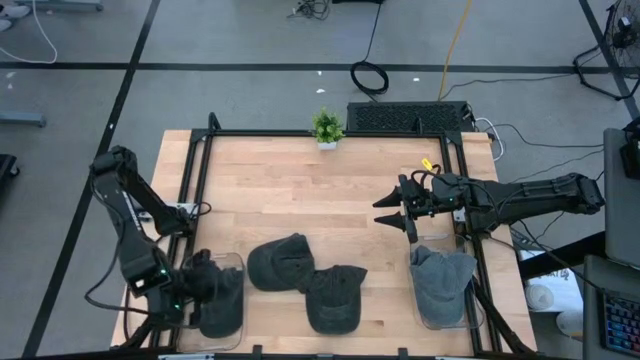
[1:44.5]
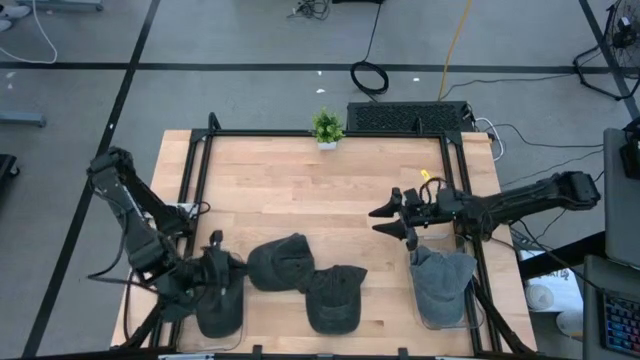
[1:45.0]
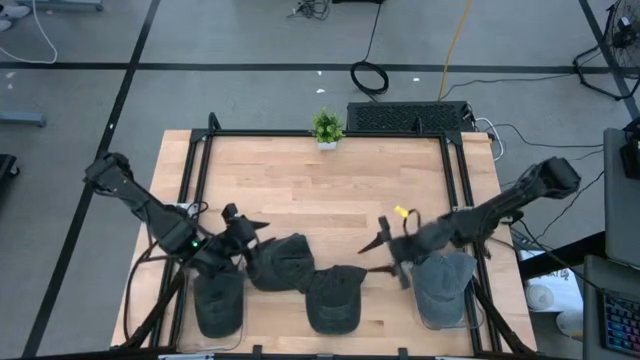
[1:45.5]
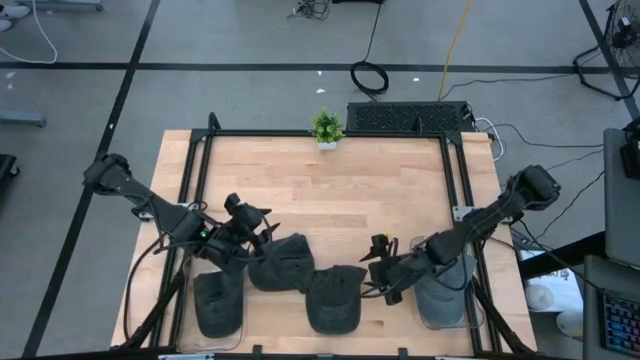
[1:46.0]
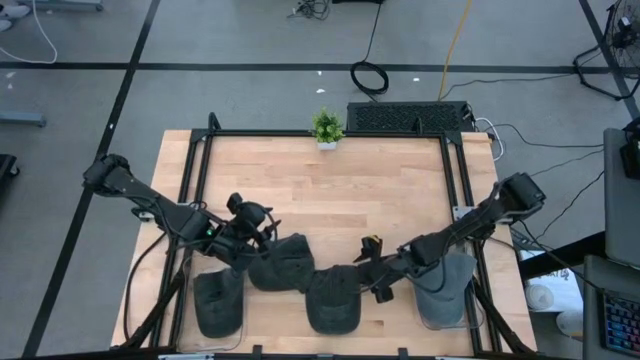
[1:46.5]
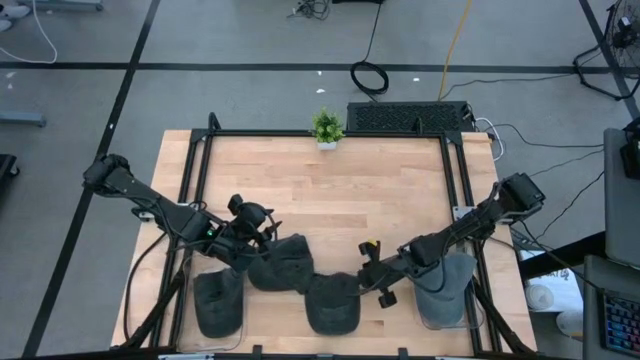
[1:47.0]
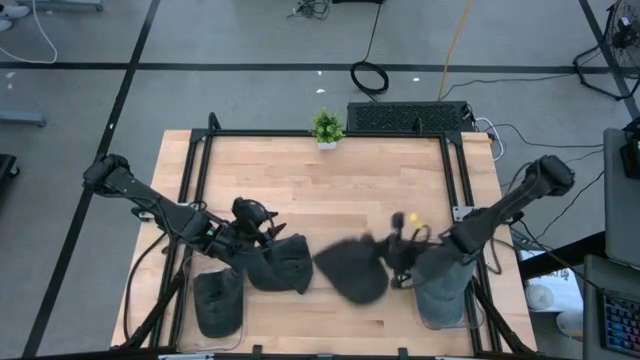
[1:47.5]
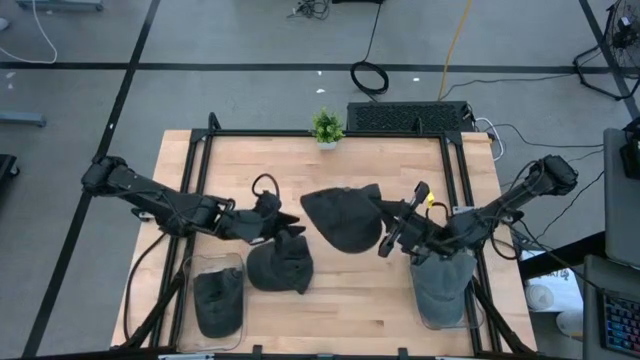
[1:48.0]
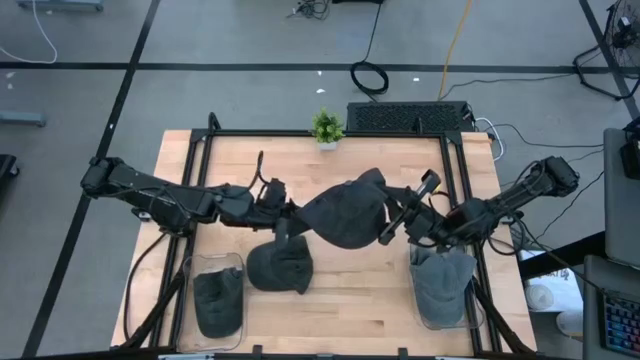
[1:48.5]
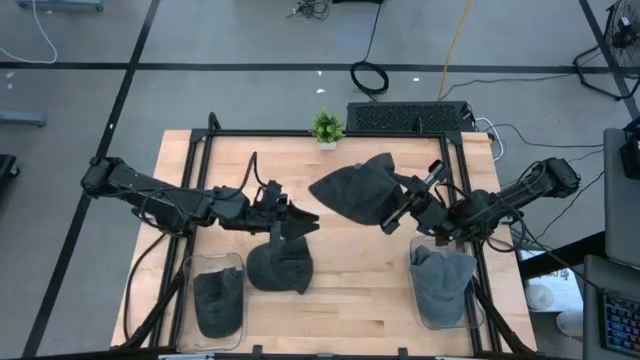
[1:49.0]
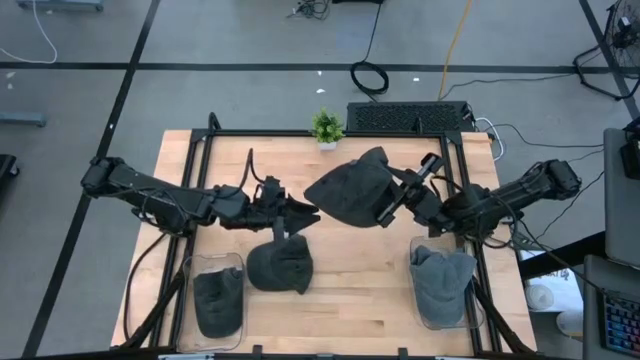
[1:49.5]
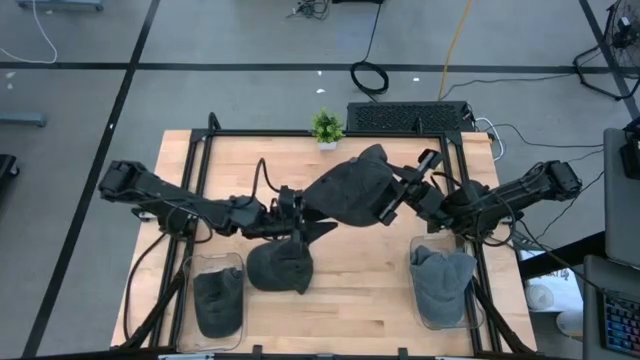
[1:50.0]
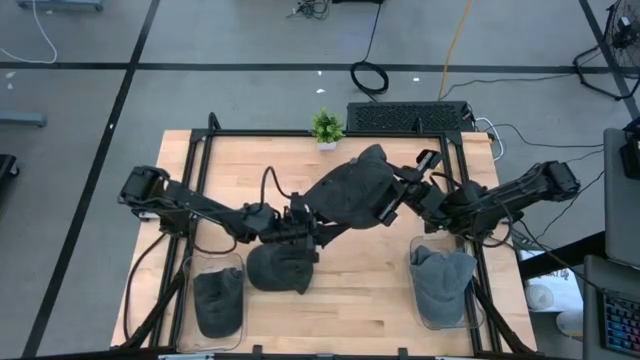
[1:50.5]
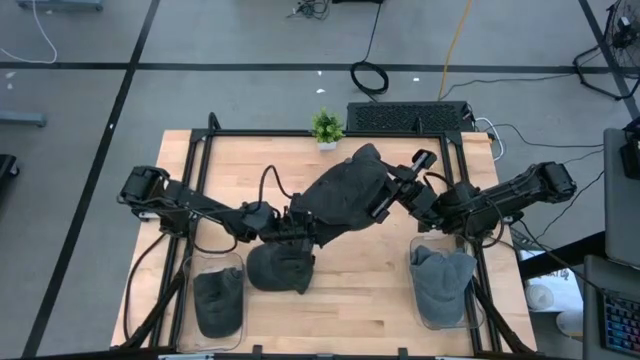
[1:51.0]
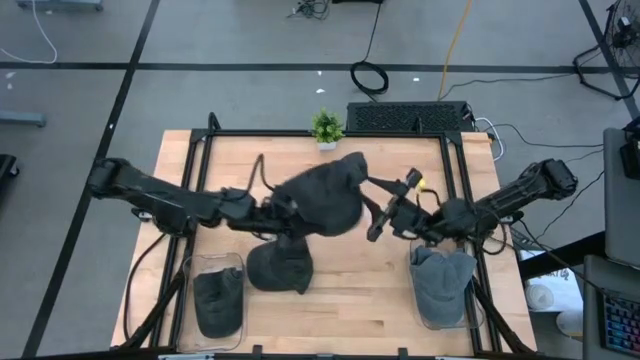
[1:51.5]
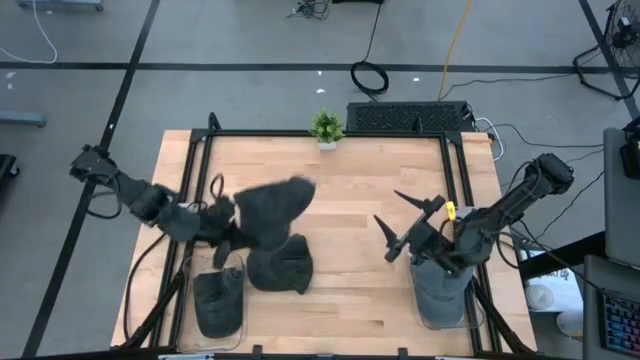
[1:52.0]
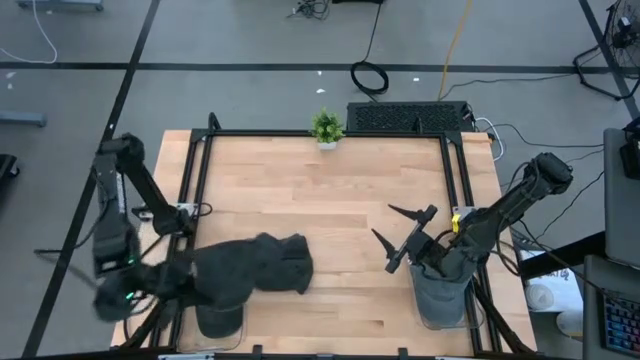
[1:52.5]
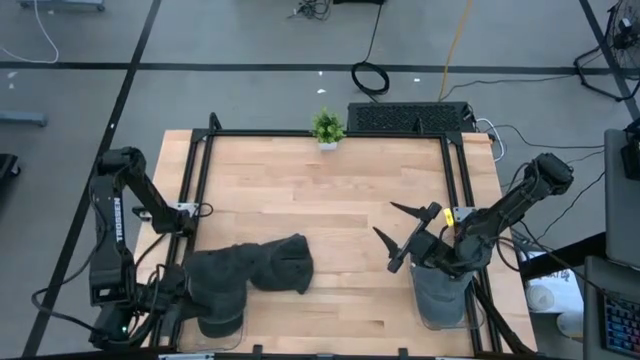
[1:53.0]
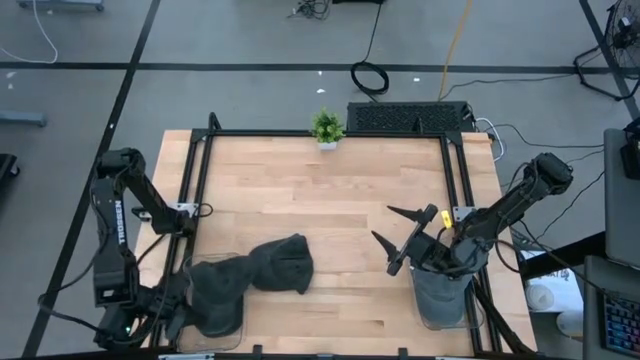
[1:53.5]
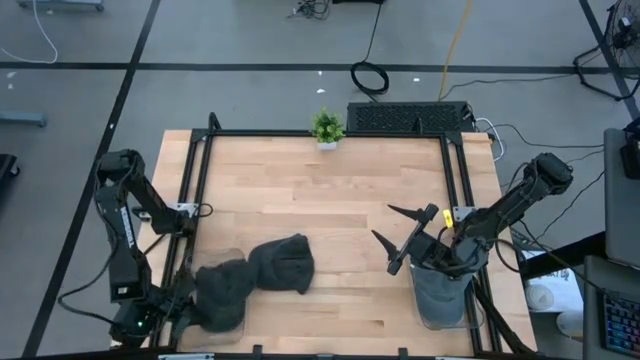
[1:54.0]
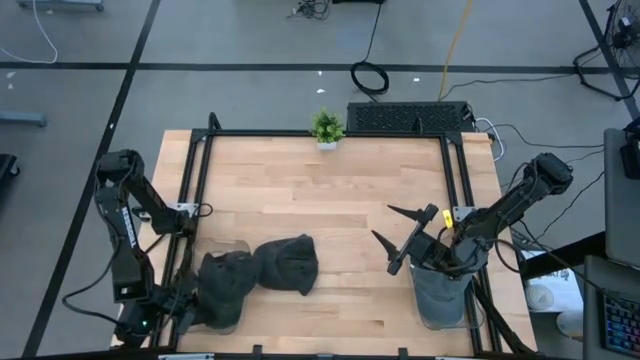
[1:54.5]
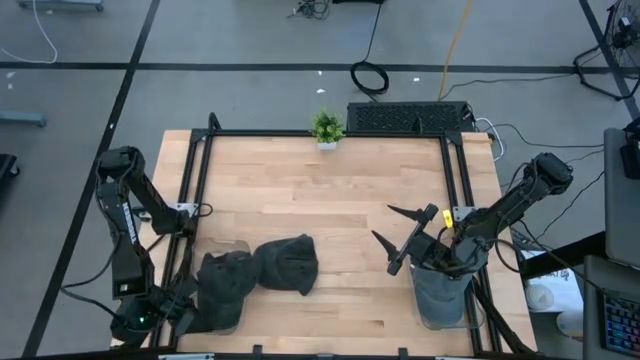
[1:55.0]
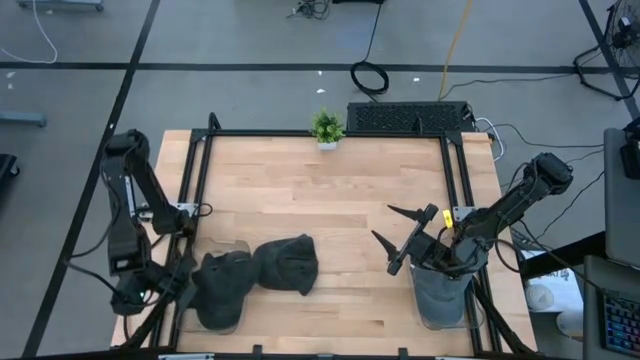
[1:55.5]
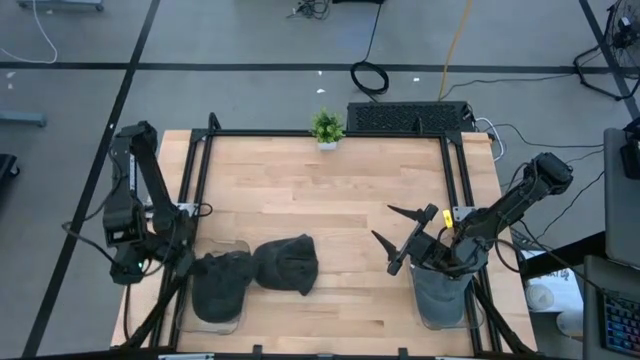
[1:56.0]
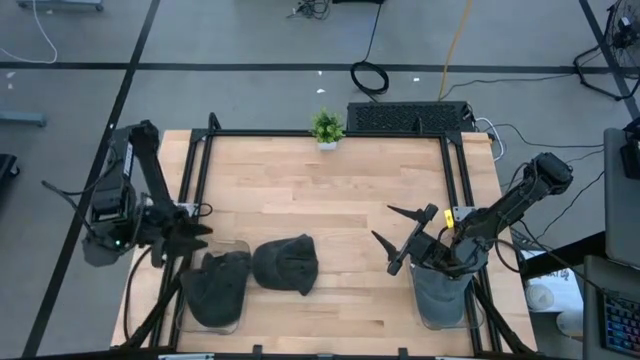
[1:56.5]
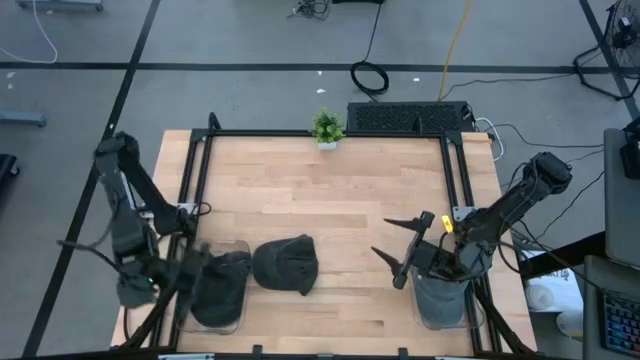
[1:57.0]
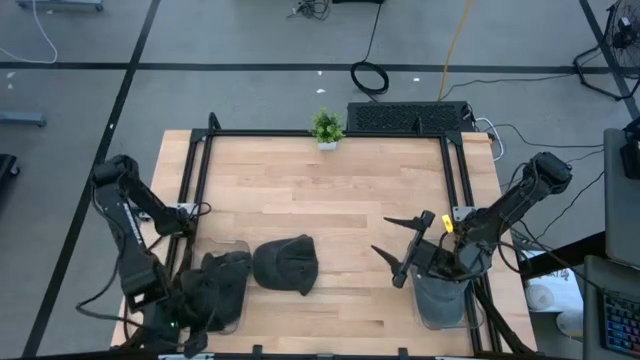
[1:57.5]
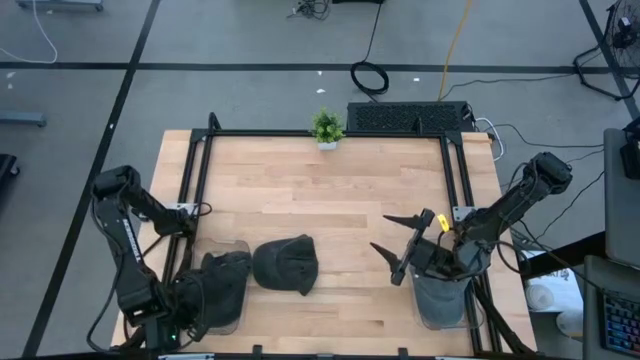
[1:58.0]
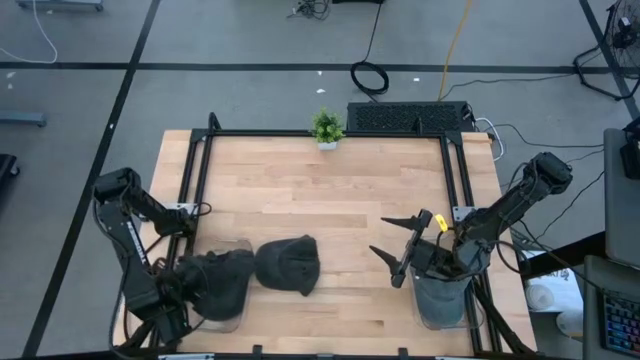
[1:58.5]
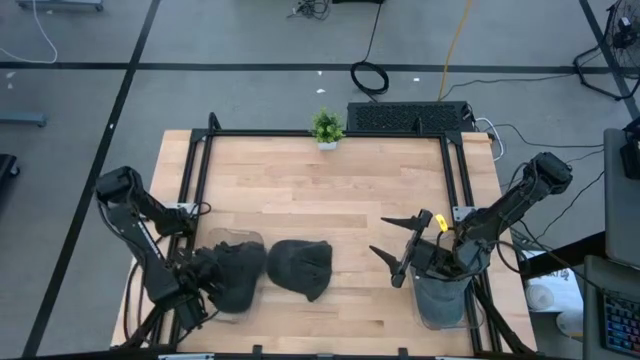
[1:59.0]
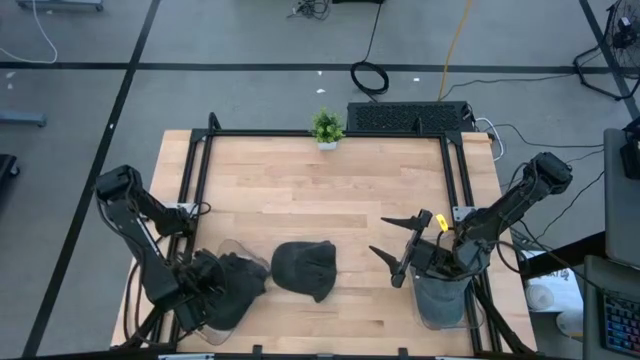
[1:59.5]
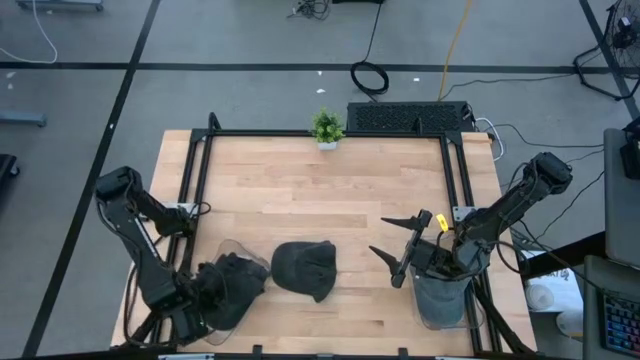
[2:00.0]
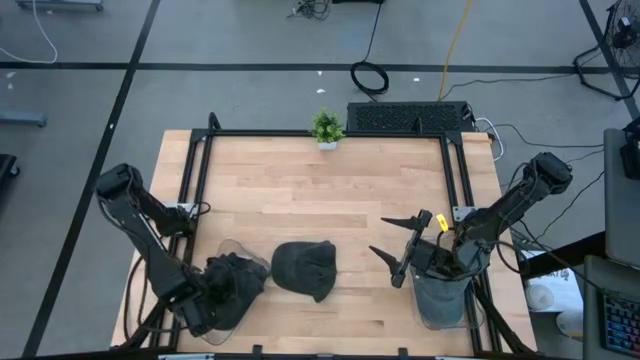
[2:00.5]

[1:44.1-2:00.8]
Task: Pick & Place hat
Put the right black cap into the left transparent bin

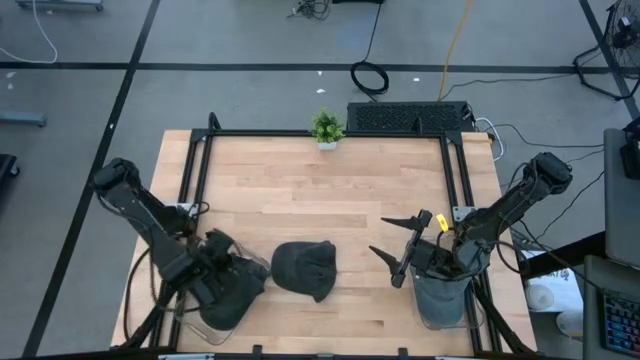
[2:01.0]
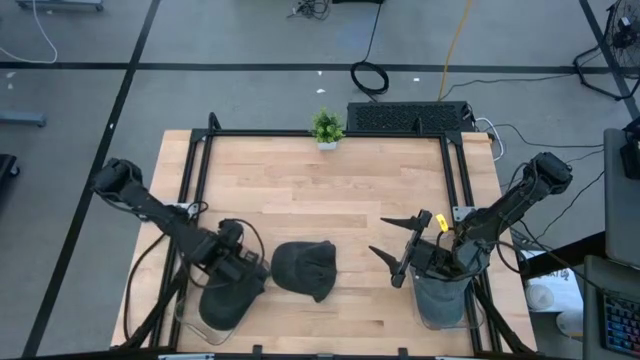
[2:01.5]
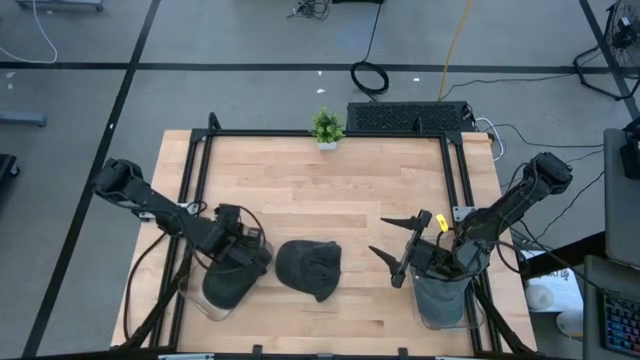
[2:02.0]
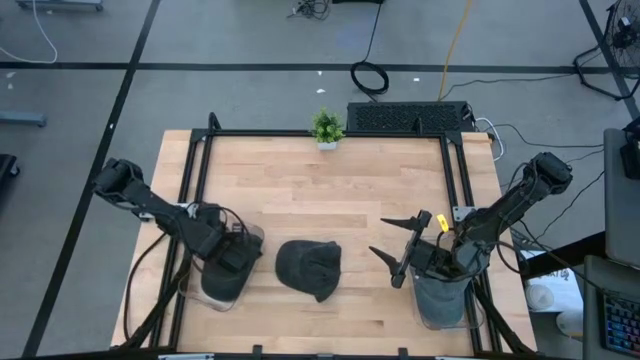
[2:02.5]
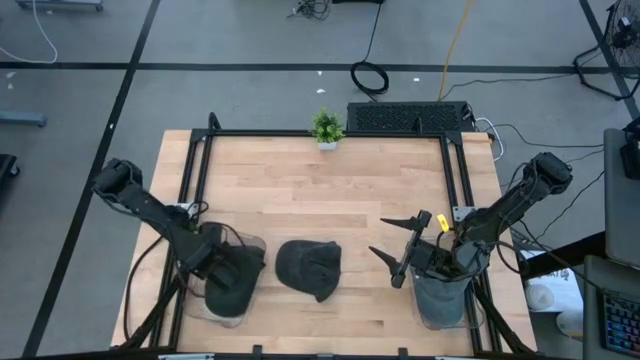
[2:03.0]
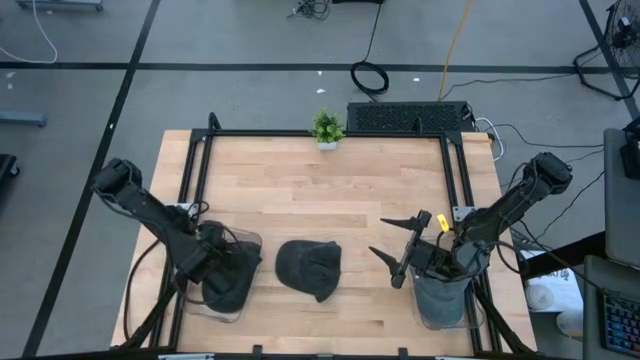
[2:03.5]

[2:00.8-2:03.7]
Adjust the left transparent bin
